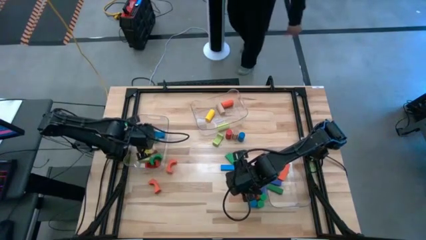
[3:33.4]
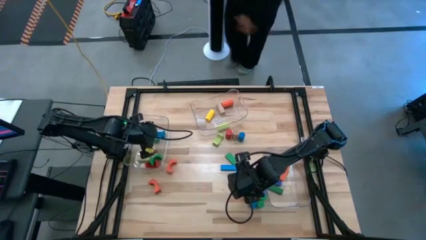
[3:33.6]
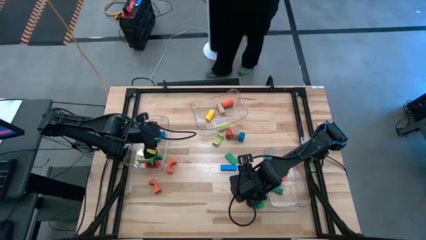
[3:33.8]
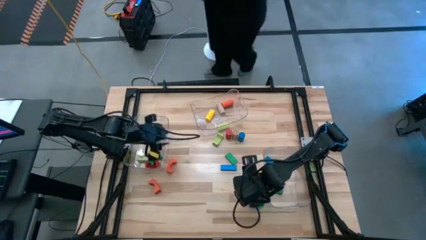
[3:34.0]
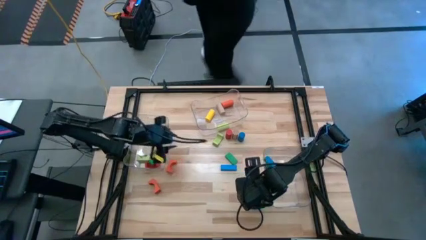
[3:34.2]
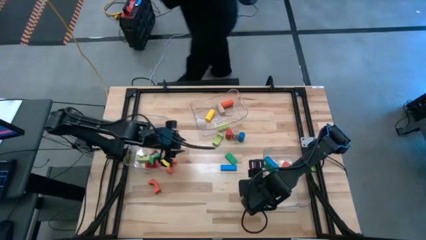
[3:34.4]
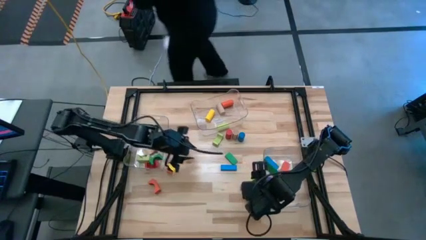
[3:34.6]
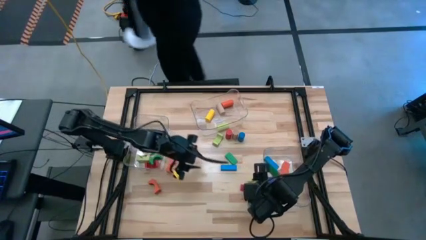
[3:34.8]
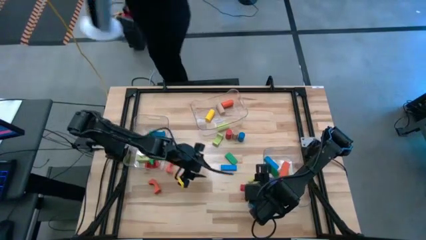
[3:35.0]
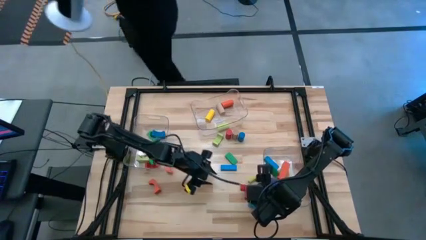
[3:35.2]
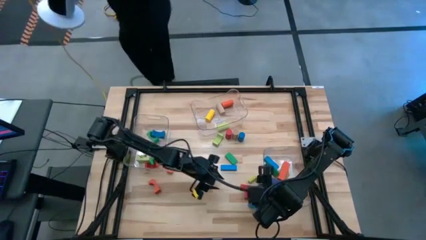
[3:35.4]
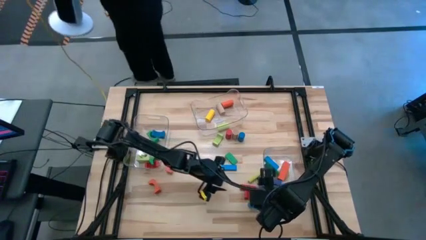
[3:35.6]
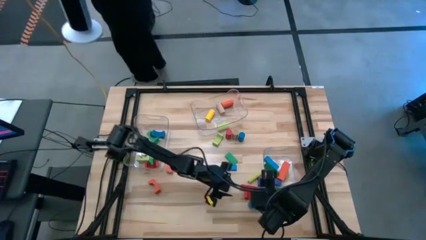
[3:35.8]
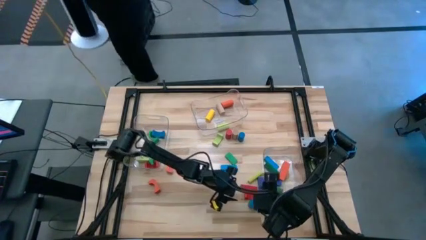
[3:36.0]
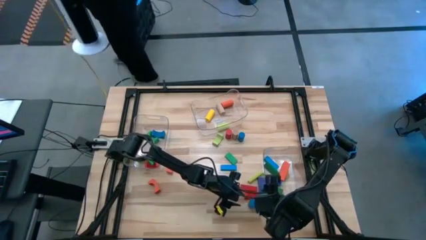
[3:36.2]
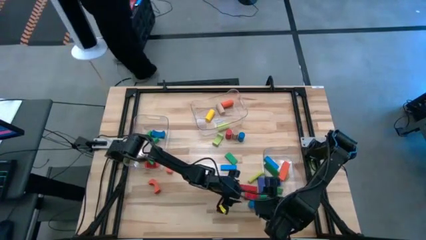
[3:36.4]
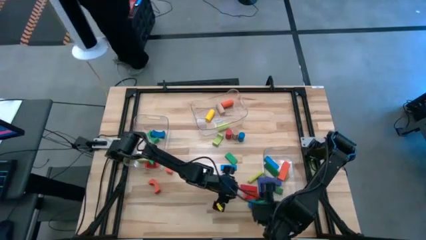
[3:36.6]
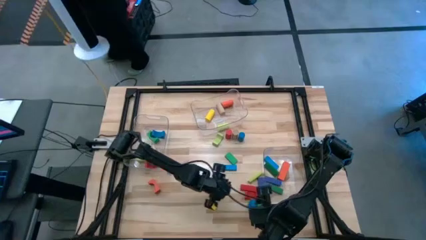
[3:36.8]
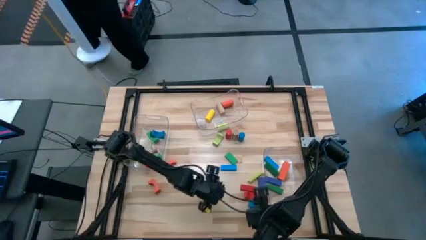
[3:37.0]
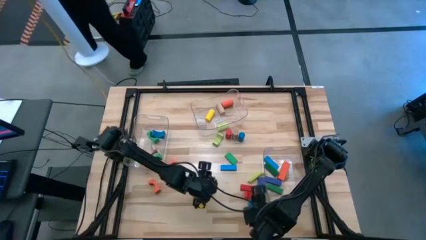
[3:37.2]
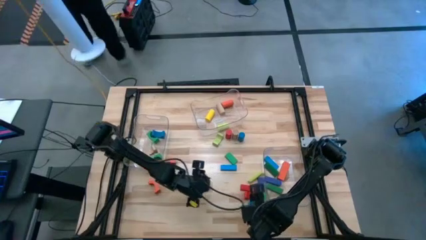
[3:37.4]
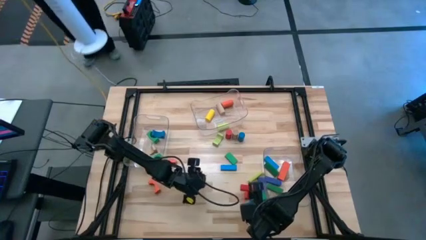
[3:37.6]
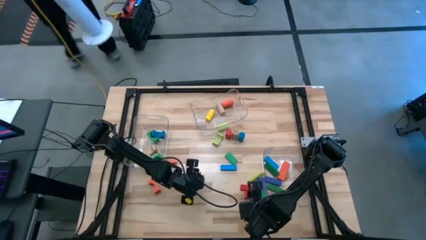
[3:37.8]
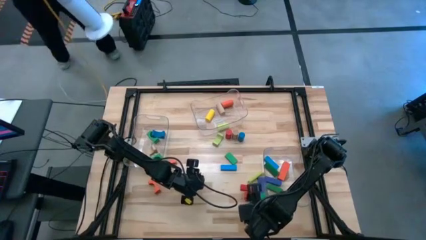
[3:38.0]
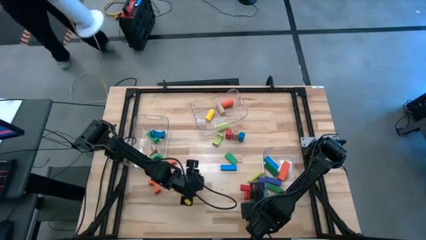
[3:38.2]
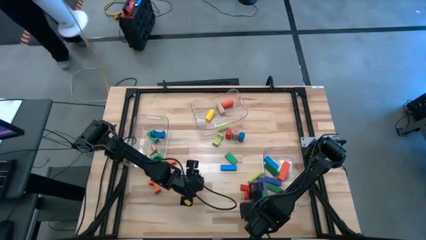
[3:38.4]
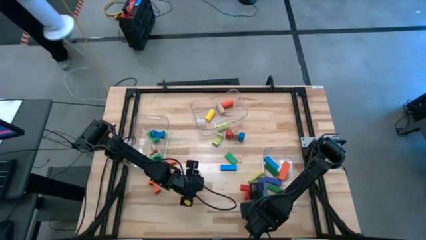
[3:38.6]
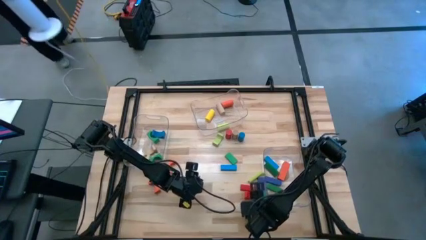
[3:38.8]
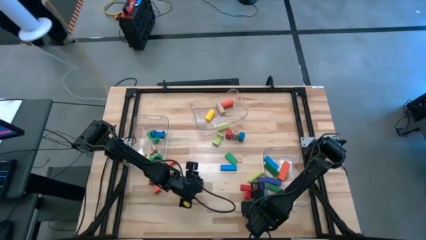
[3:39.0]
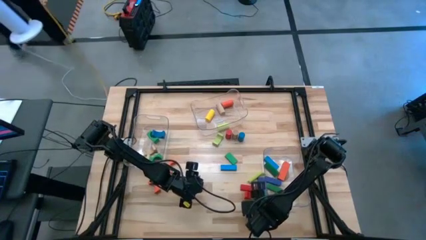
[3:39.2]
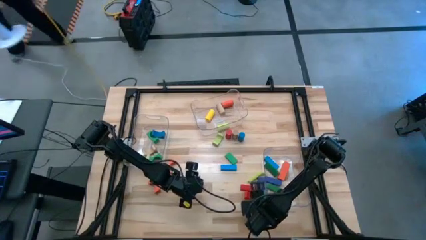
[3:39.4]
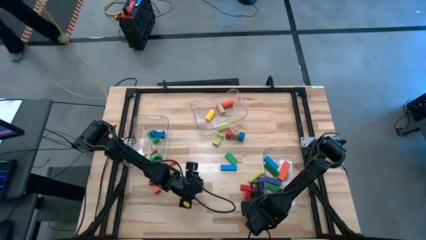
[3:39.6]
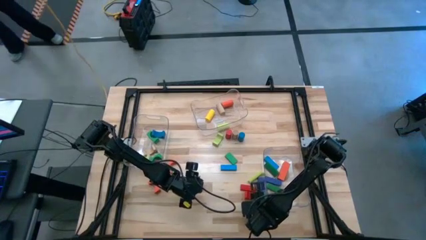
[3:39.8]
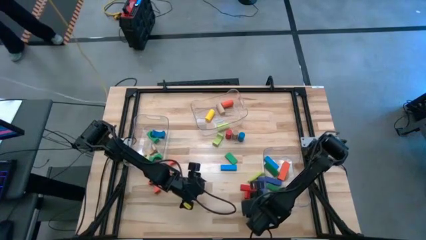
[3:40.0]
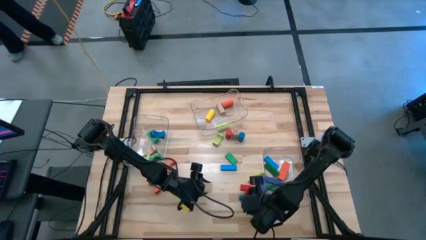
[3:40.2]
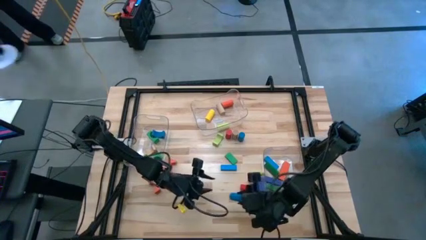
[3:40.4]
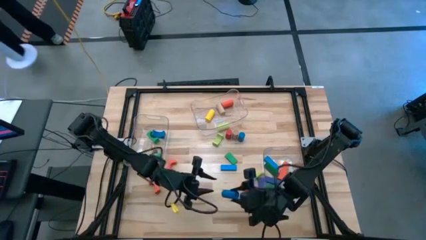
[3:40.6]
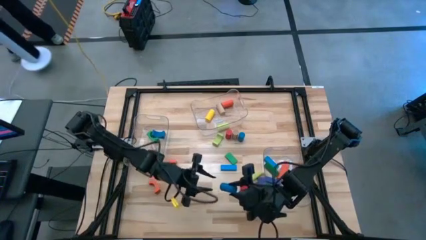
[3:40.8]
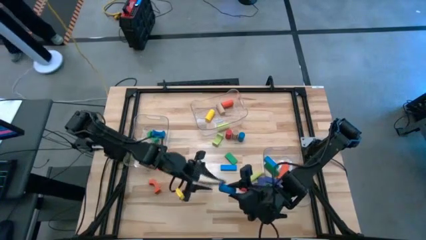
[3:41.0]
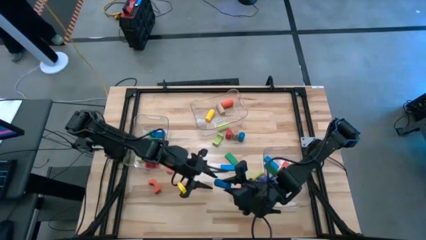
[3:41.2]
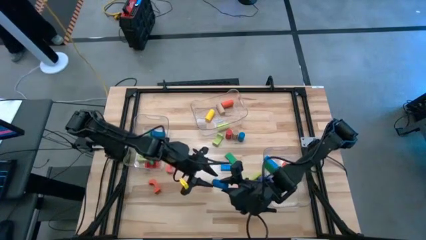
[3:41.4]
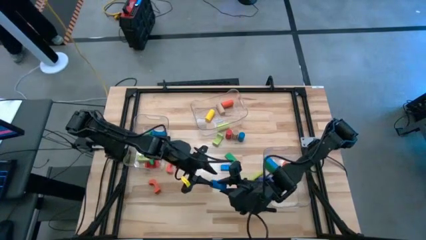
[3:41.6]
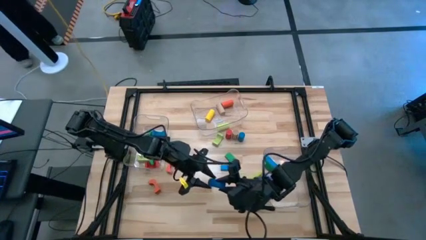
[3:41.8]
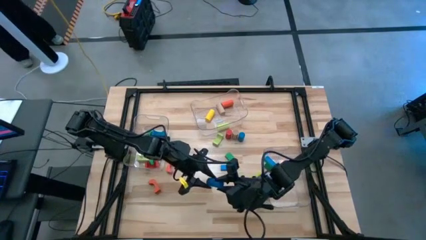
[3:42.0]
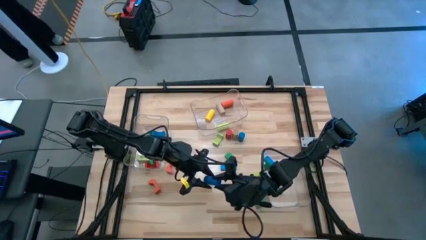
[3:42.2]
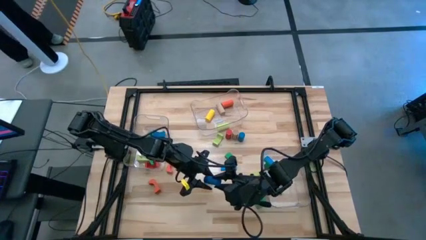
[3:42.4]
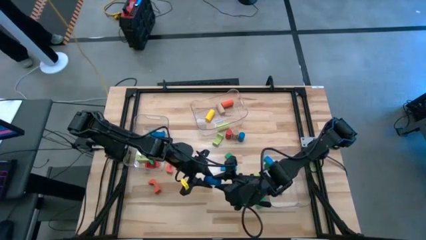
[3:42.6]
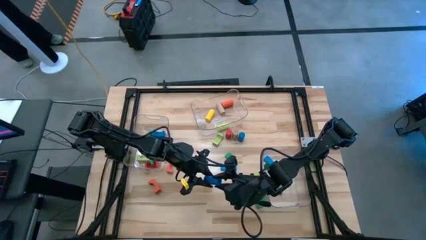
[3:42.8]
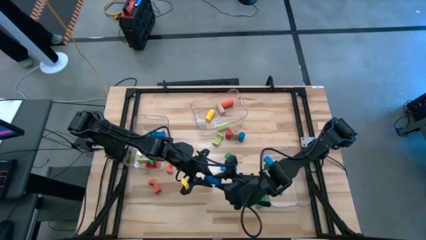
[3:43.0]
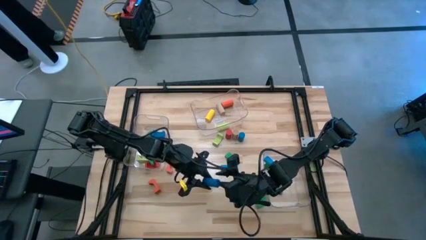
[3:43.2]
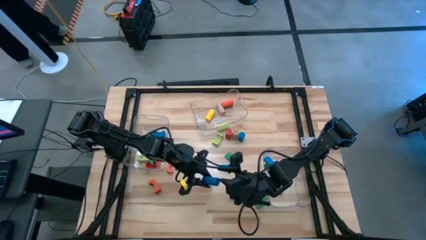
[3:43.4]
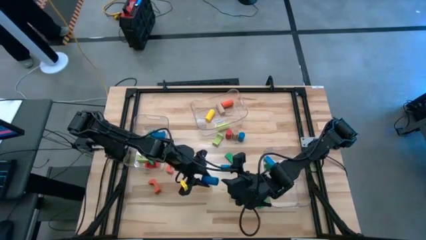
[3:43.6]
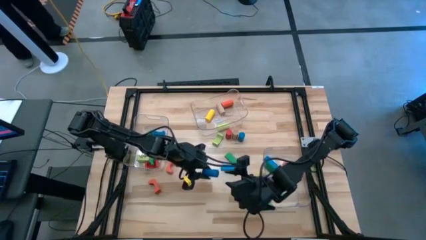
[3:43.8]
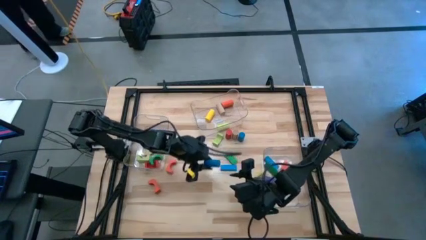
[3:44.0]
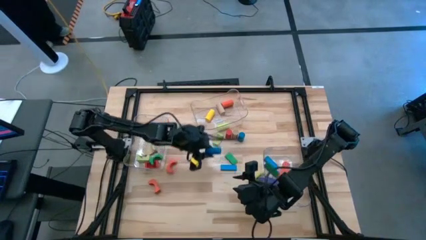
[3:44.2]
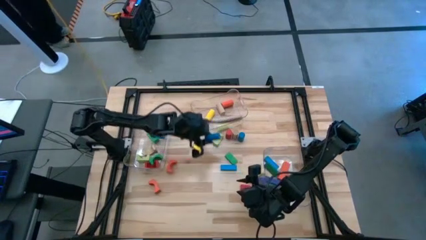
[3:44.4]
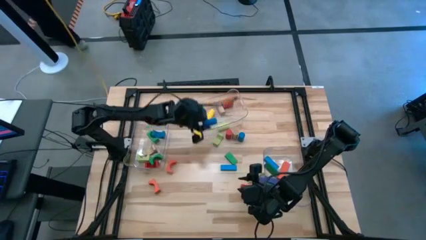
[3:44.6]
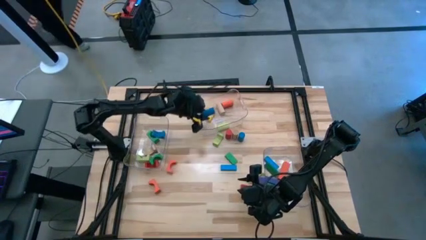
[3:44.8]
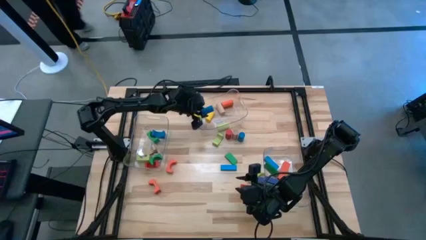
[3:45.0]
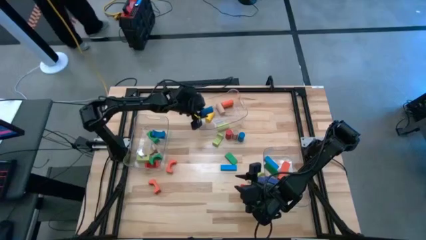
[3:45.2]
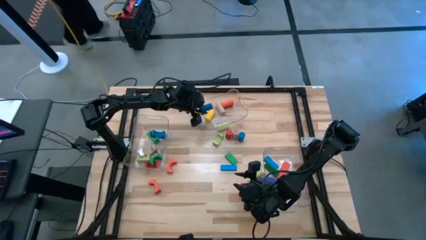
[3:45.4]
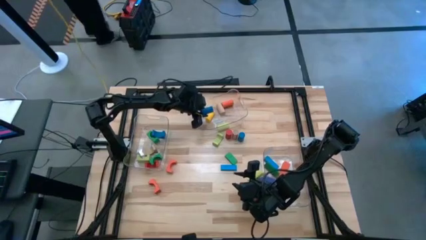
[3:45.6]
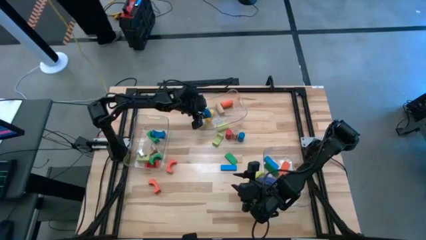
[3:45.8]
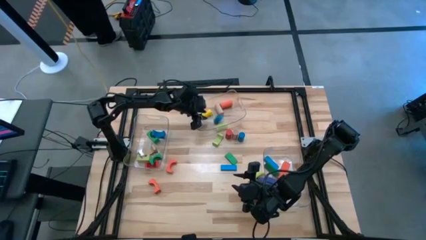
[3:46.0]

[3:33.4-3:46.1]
Task: Sort blocks by size
Put the blue cylindrical block into the top transparent bin
